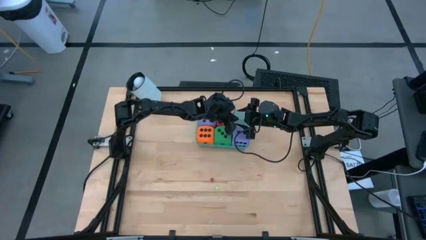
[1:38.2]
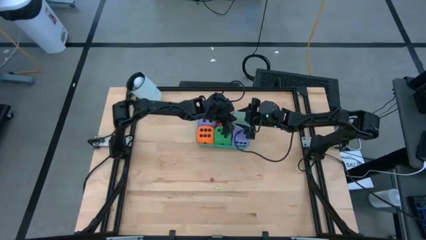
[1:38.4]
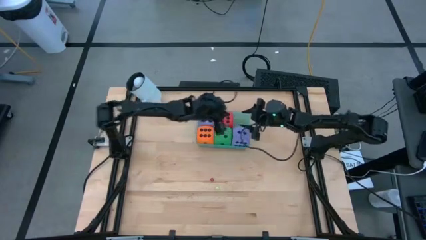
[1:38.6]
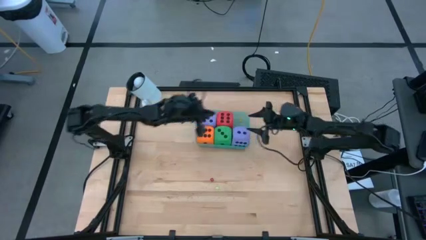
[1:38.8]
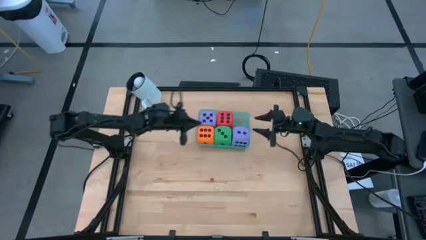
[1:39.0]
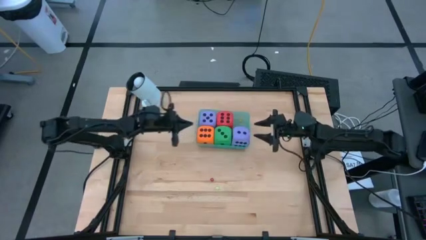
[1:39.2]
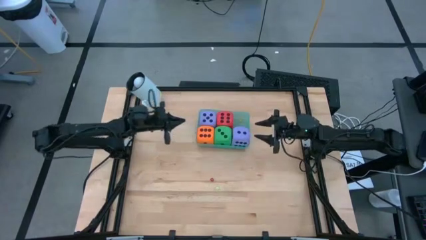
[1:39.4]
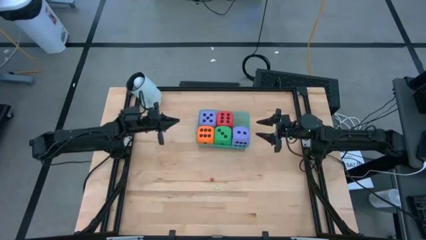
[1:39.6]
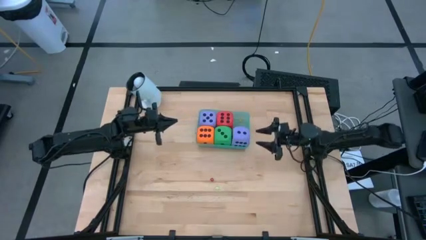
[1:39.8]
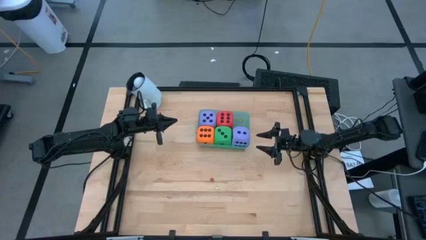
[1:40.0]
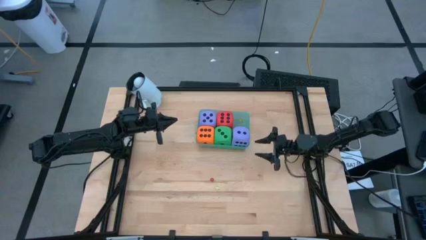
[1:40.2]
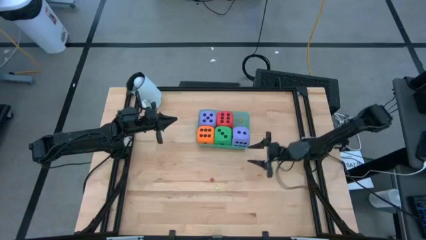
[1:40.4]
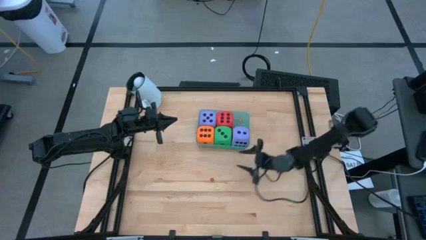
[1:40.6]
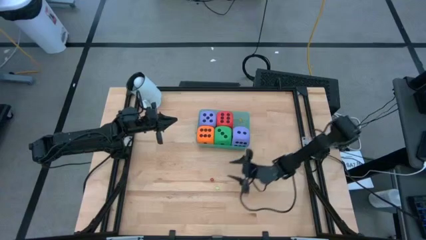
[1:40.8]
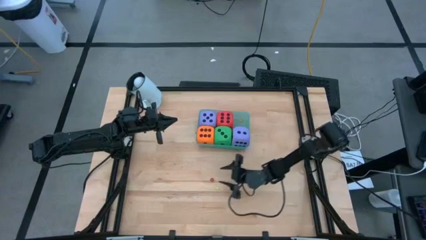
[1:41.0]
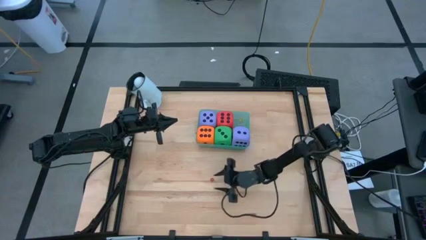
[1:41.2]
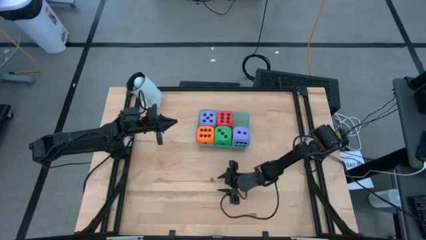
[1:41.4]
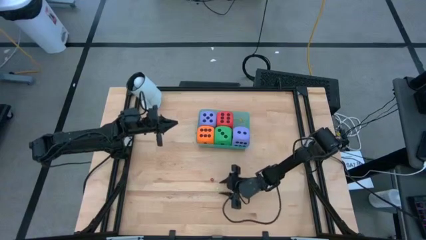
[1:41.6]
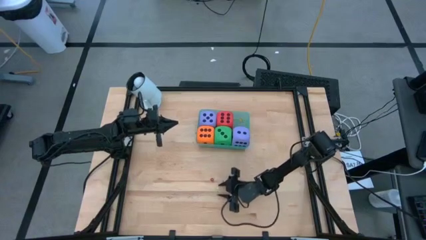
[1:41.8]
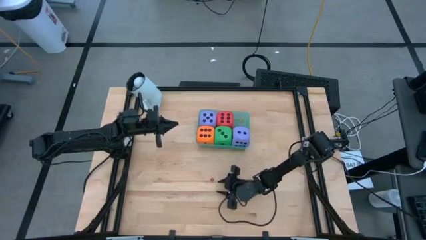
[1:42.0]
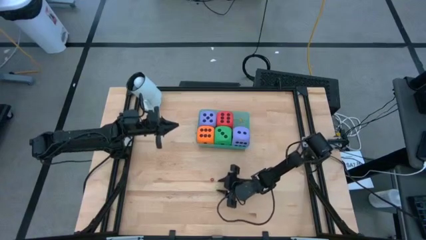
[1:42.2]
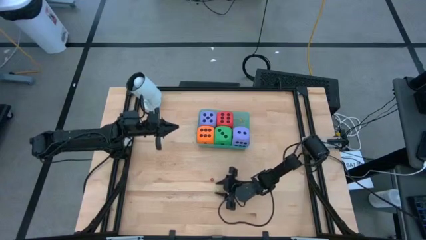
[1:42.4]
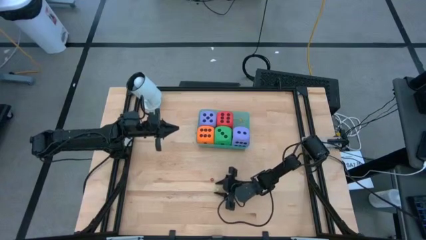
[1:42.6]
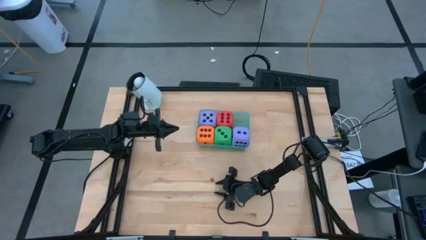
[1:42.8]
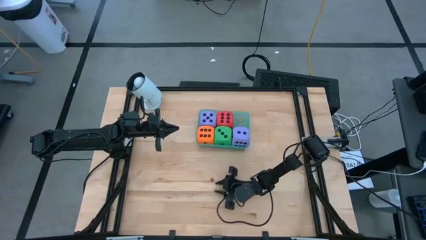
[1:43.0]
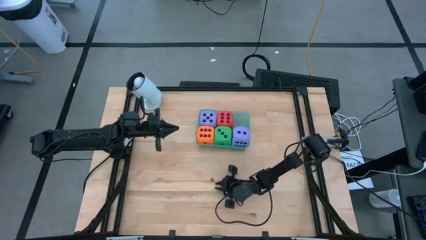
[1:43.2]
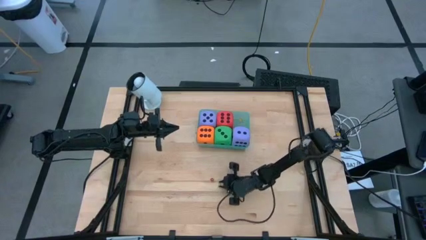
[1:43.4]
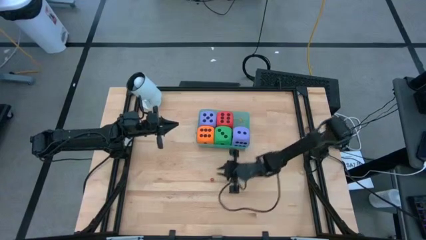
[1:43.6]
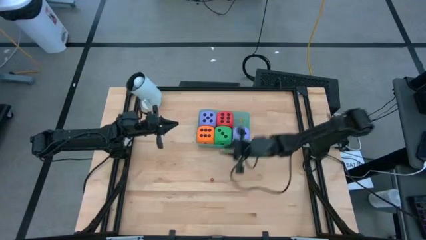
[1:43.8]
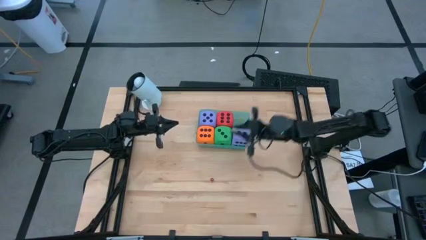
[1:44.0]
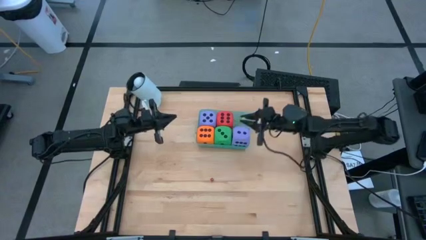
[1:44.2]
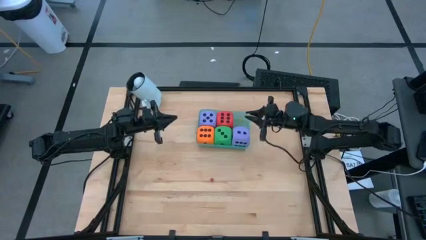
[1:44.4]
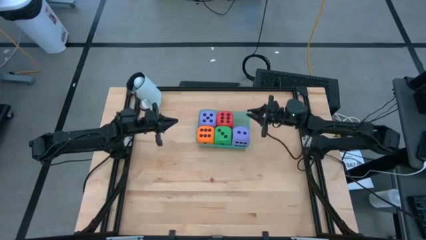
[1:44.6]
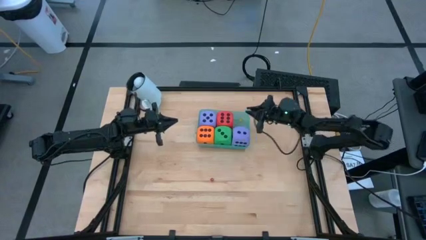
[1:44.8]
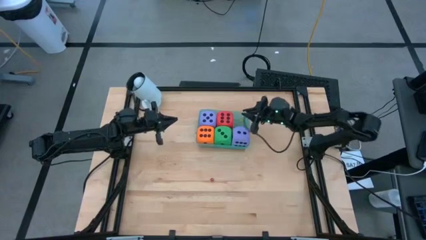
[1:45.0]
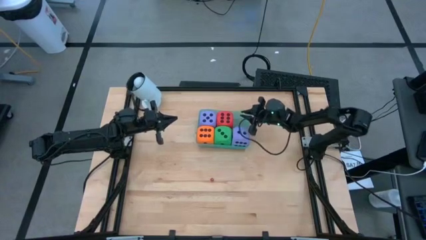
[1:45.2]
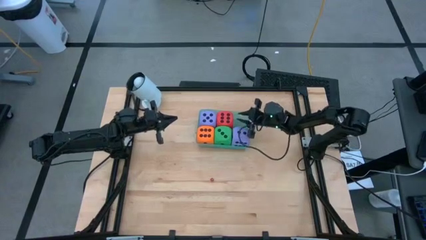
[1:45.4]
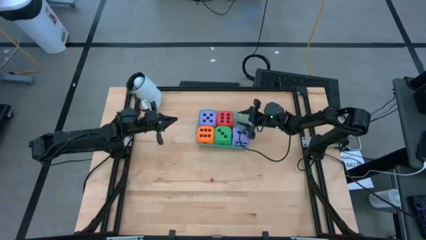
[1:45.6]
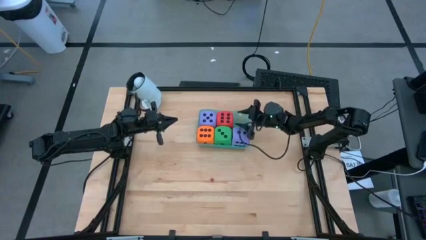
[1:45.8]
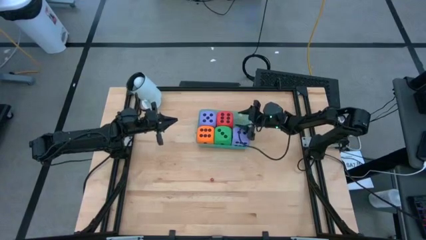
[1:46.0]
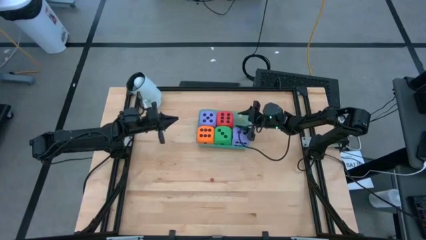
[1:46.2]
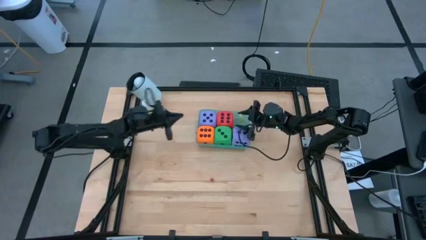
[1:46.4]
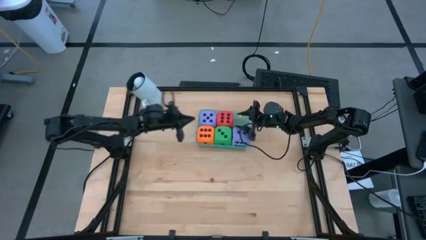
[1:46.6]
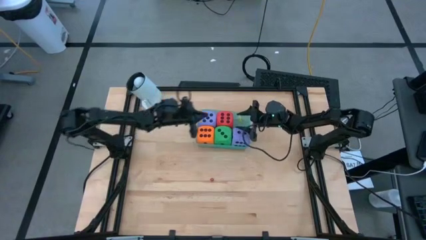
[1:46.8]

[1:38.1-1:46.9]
Task: Pick & Place Dice
Put the small green die into the green bin

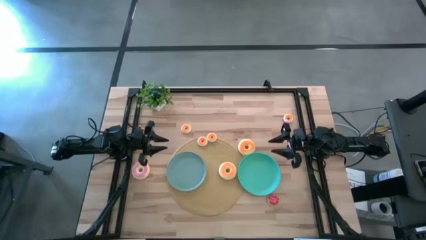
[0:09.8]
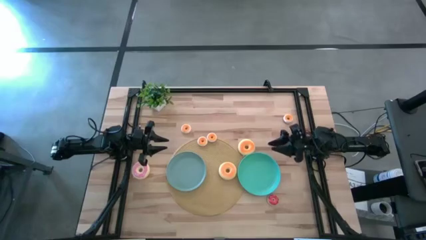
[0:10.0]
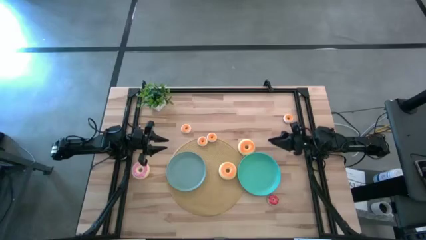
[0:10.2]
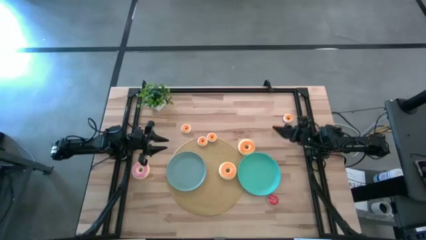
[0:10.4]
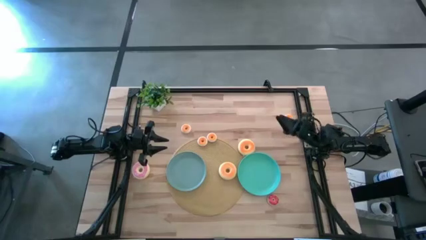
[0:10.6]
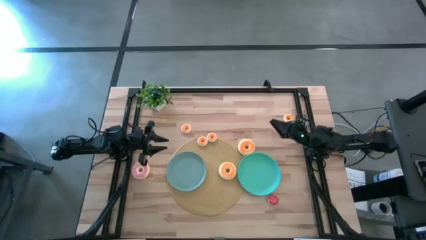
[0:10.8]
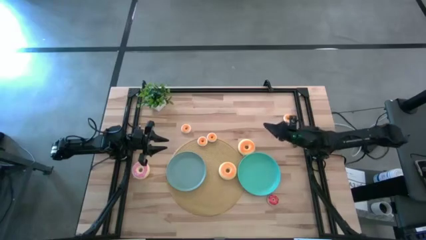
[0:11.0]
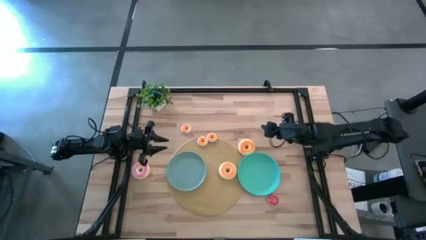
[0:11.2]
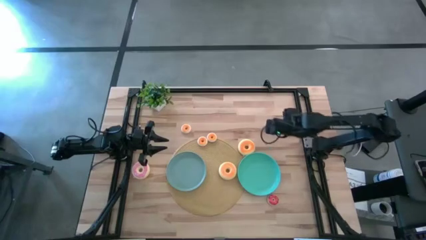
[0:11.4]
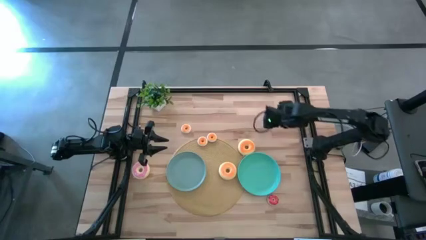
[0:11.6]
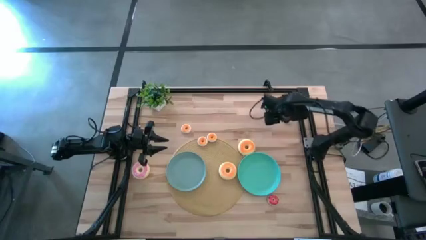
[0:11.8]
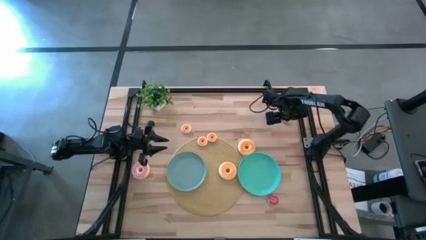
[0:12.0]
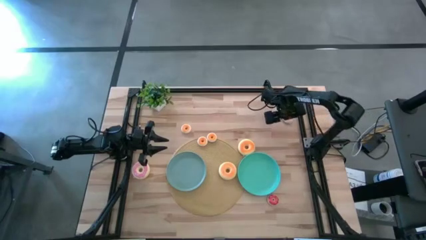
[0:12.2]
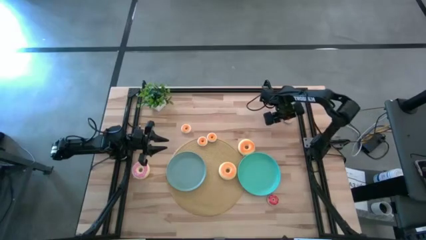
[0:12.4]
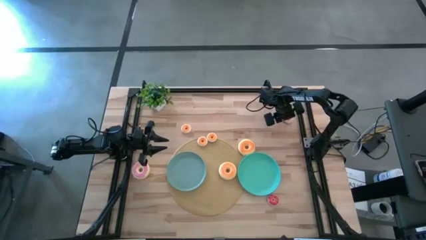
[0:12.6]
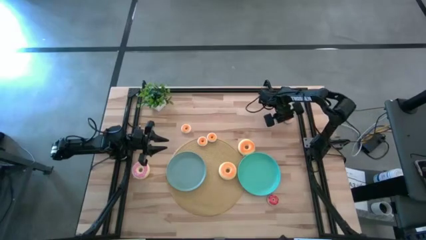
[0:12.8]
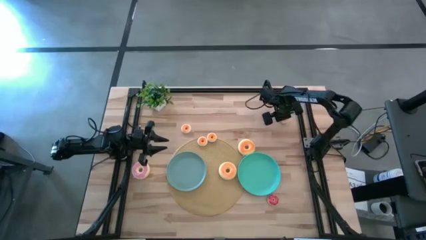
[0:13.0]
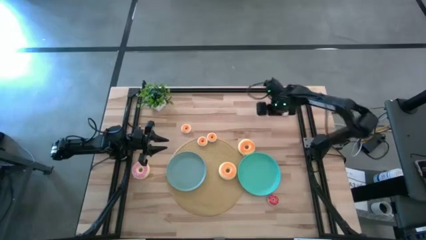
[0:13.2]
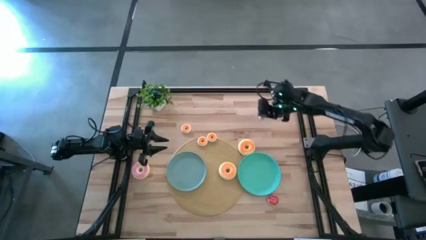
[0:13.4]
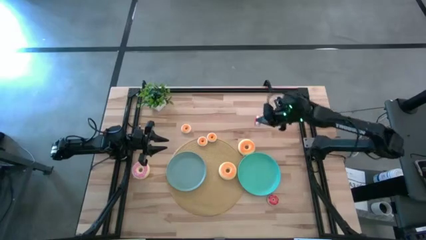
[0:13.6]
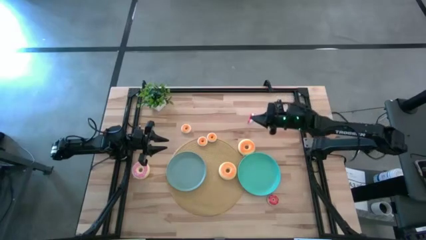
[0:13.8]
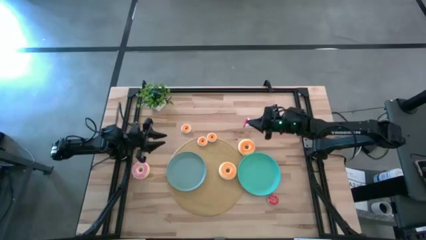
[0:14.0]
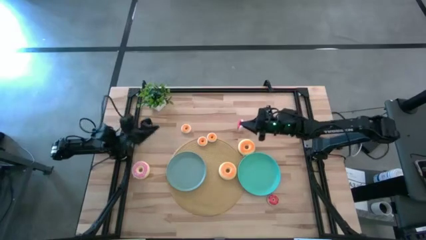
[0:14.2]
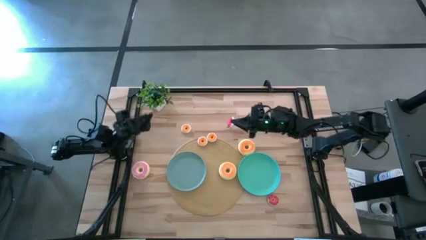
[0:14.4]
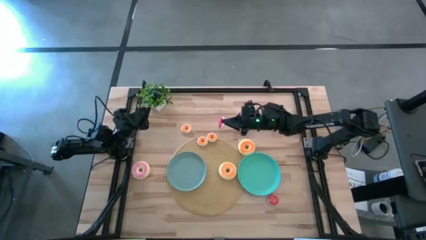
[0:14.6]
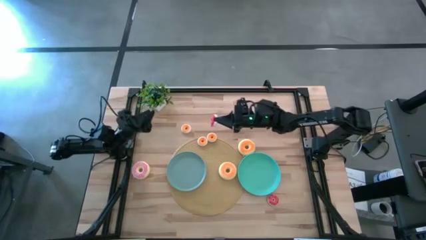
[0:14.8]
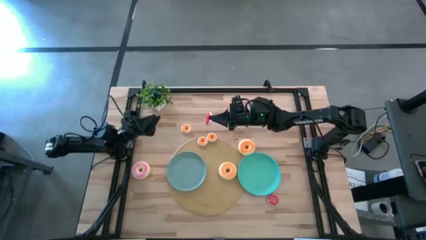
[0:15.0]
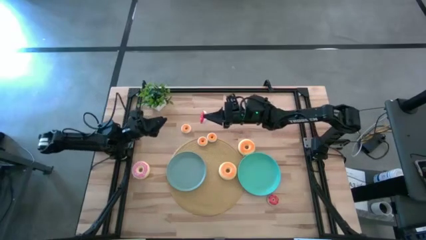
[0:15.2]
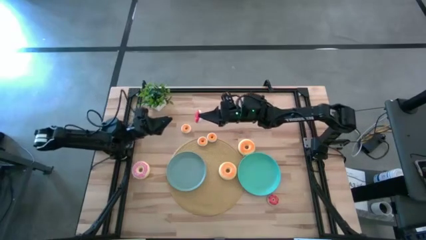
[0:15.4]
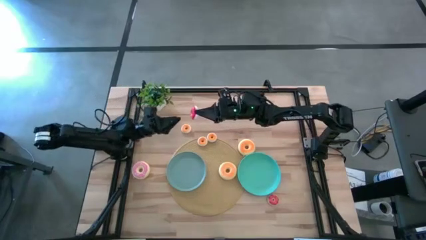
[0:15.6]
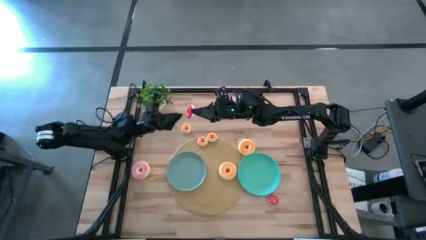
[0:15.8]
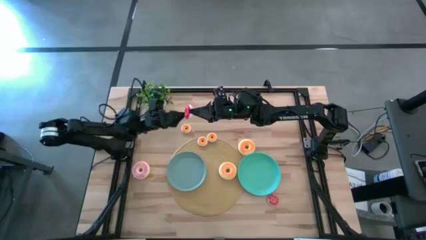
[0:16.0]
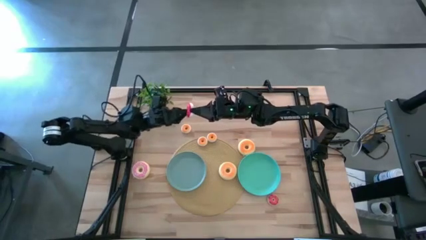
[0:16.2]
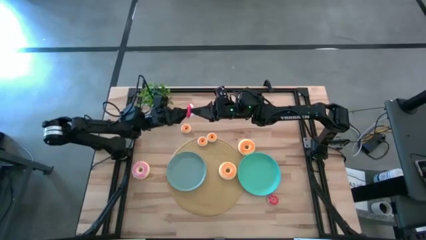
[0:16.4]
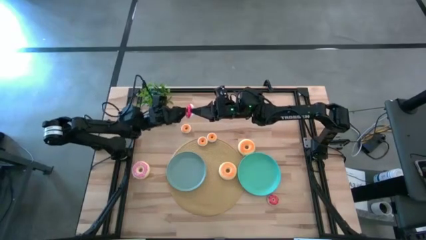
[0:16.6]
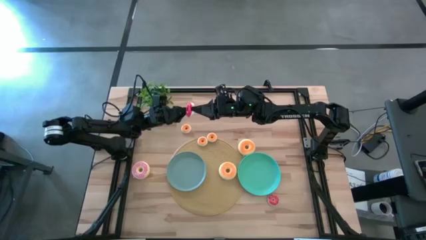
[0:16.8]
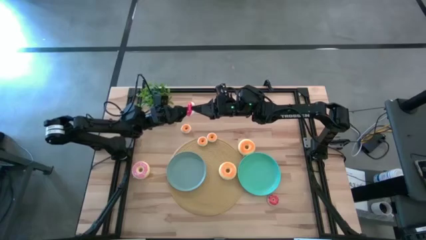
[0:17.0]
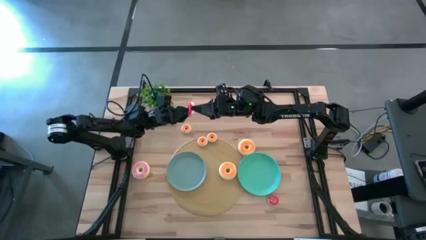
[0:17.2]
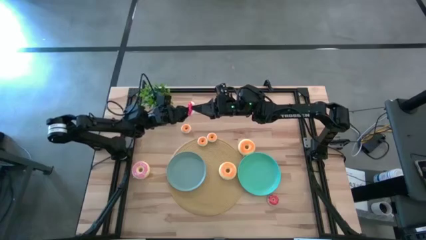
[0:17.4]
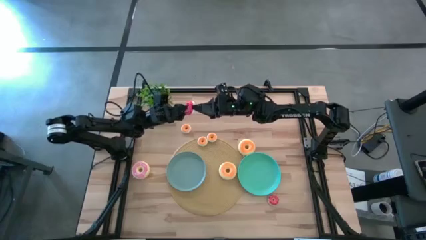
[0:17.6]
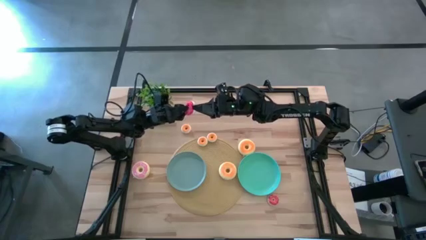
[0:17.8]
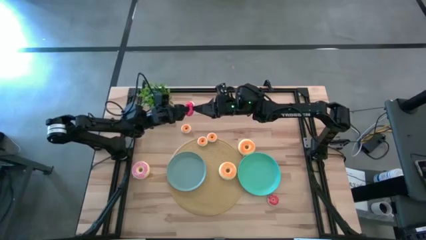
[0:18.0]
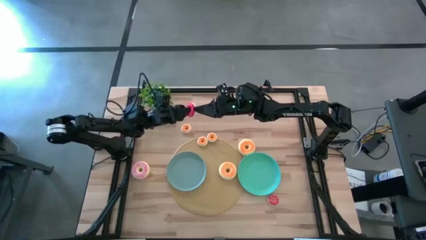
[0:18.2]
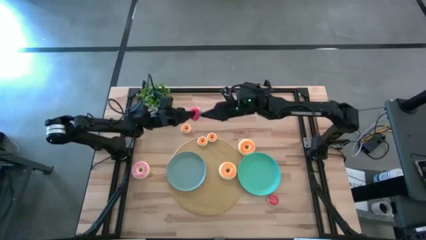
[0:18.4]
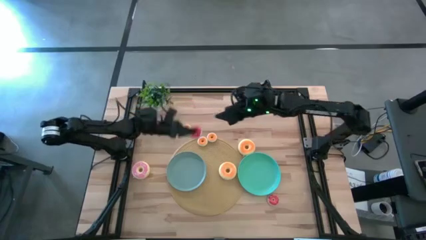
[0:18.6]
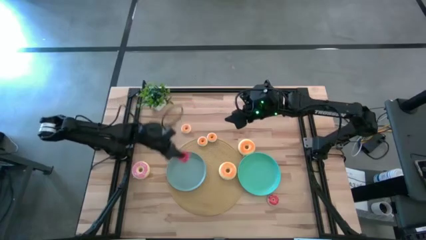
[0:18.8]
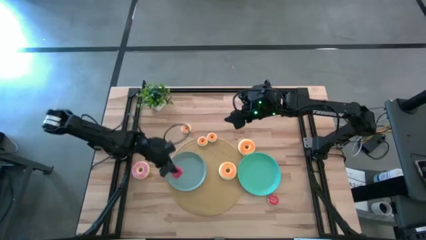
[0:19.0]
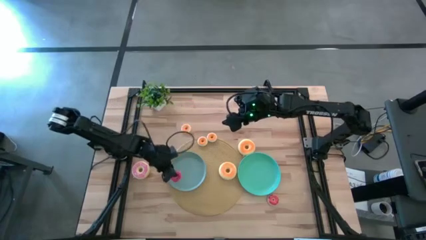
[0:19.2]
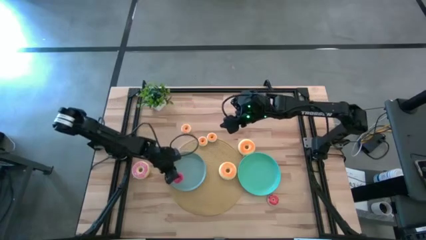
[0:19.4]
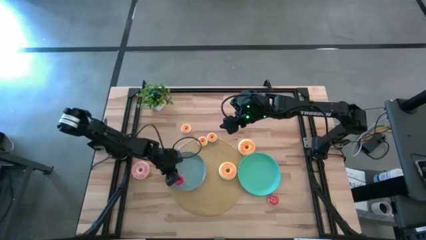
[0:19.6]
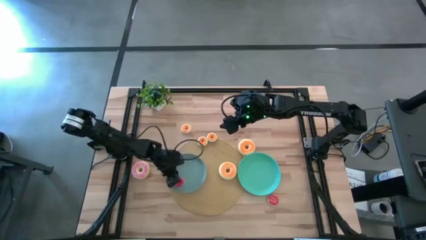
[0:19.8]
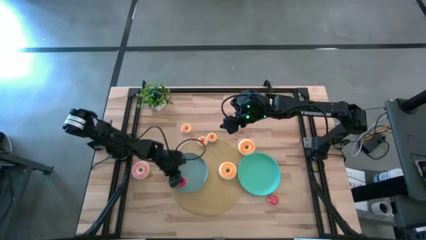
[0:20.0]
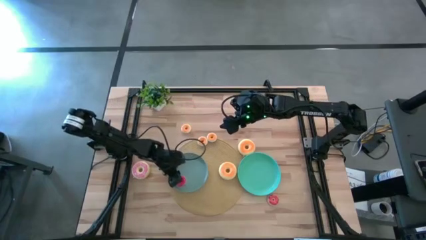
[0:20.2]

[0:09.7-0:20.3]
Task: Pick & Place donuts
Put the small red donut on the blue plate
